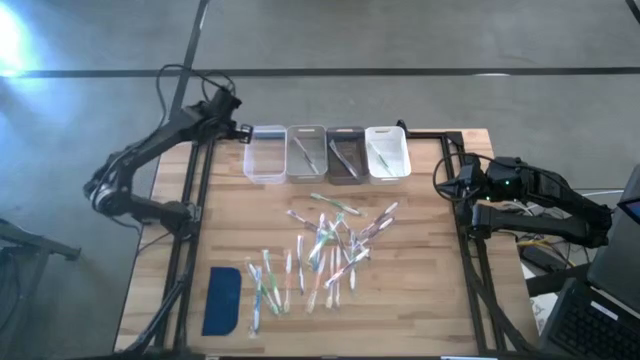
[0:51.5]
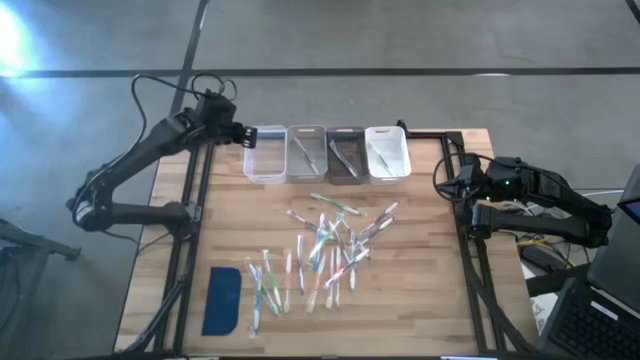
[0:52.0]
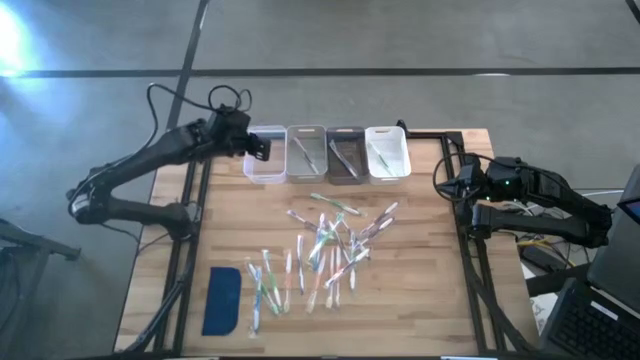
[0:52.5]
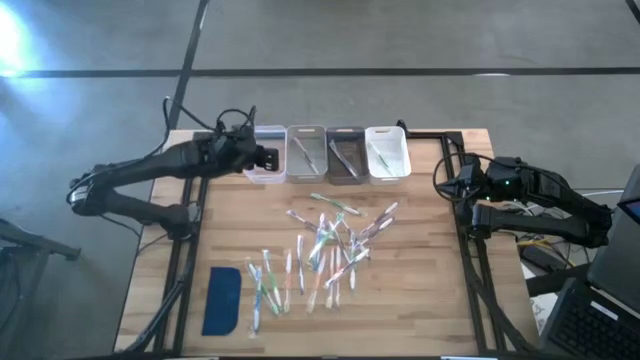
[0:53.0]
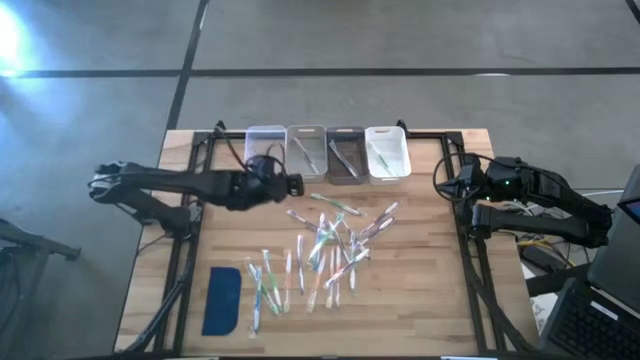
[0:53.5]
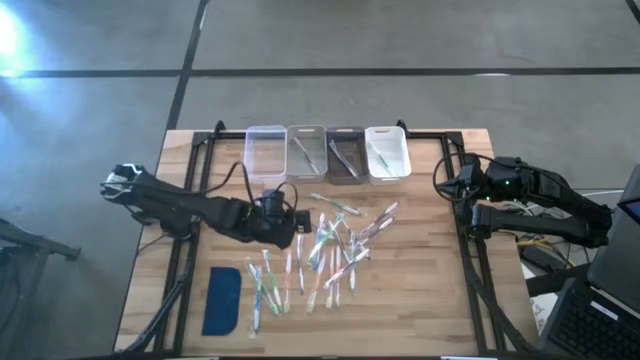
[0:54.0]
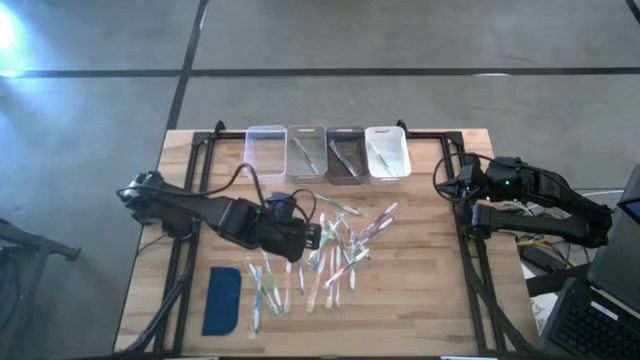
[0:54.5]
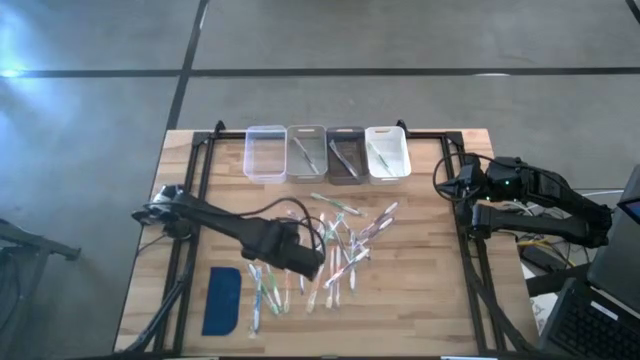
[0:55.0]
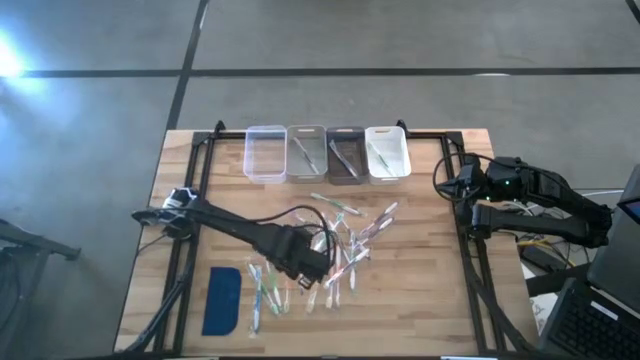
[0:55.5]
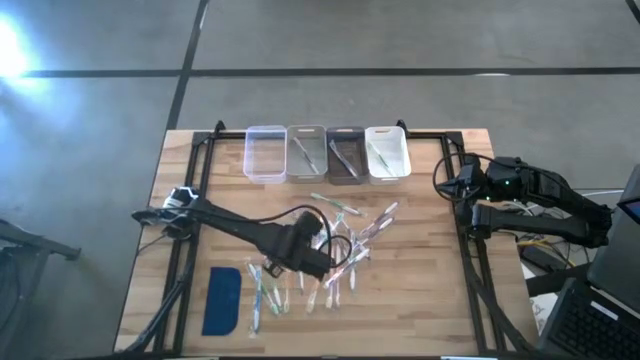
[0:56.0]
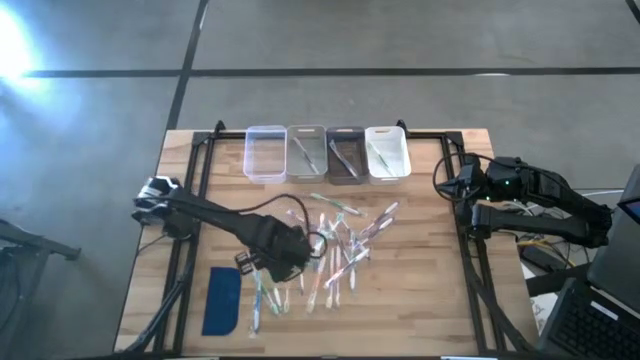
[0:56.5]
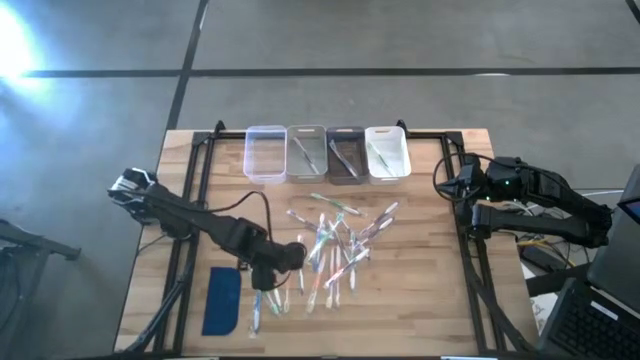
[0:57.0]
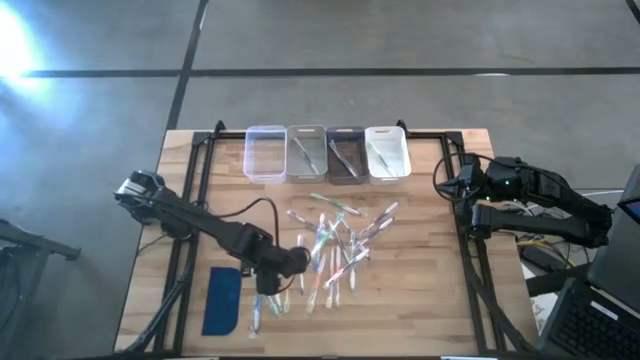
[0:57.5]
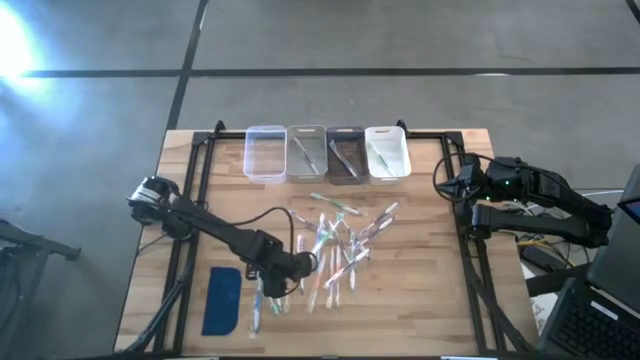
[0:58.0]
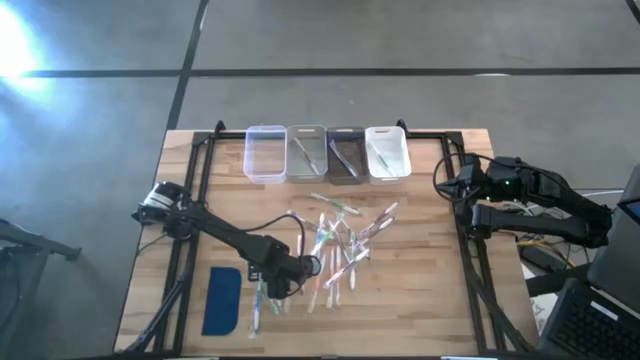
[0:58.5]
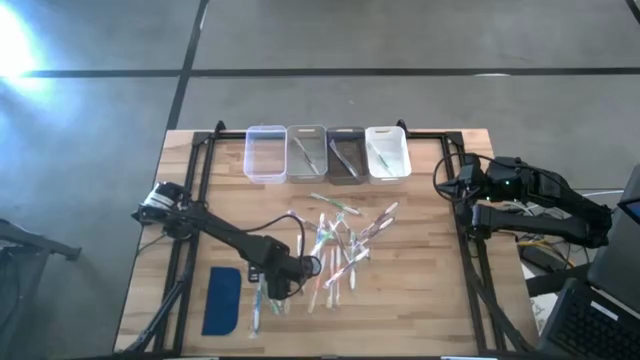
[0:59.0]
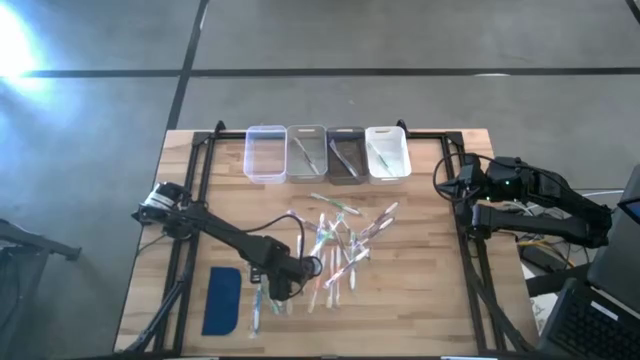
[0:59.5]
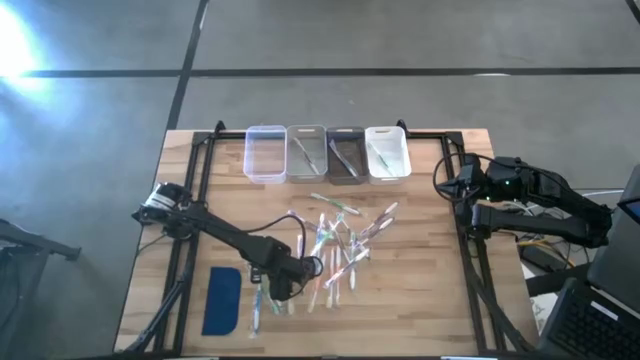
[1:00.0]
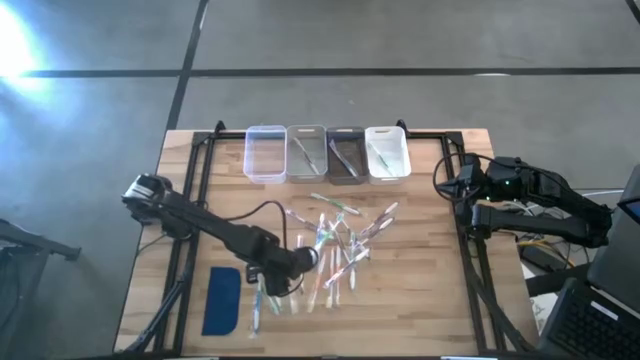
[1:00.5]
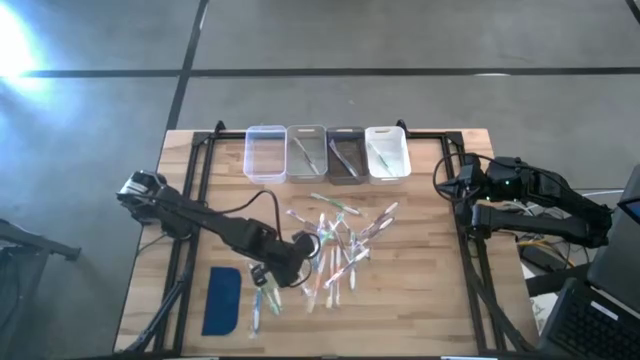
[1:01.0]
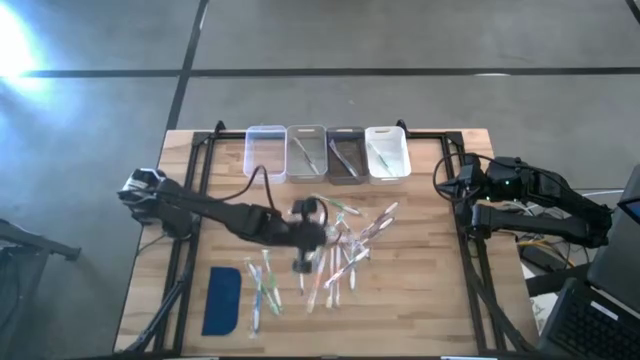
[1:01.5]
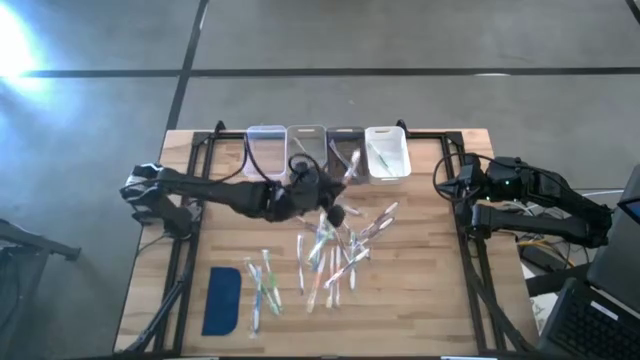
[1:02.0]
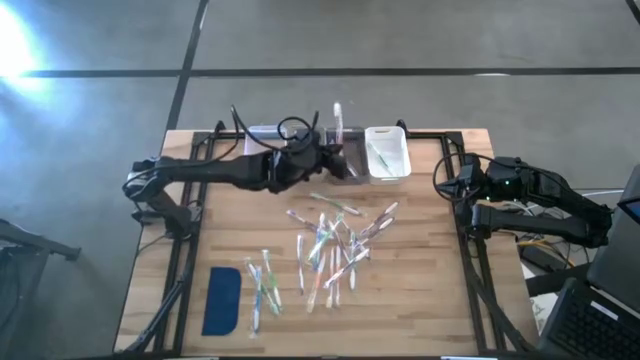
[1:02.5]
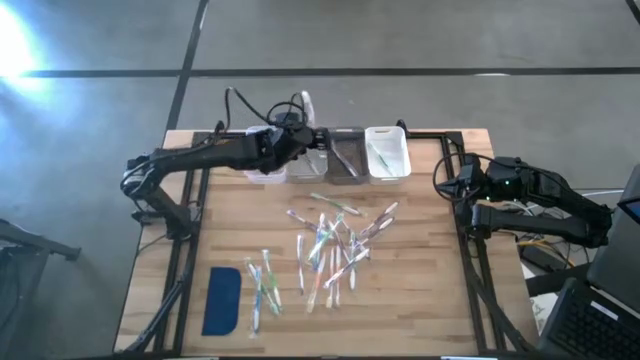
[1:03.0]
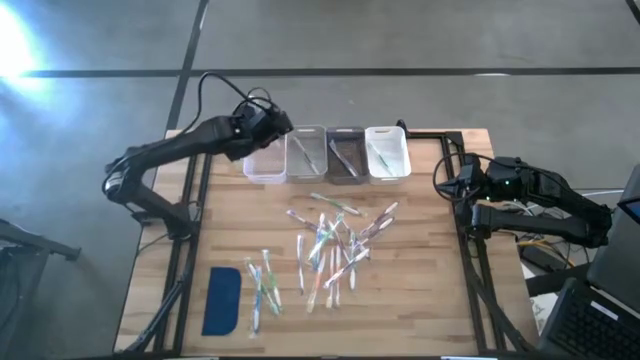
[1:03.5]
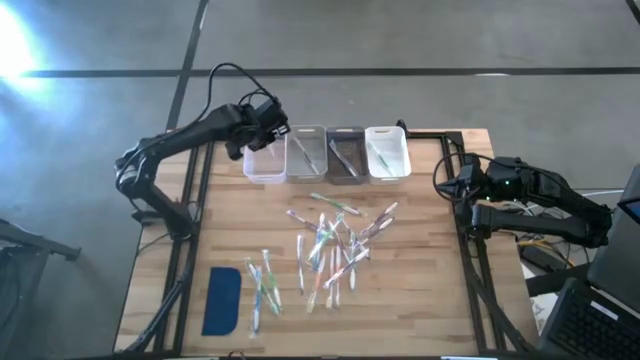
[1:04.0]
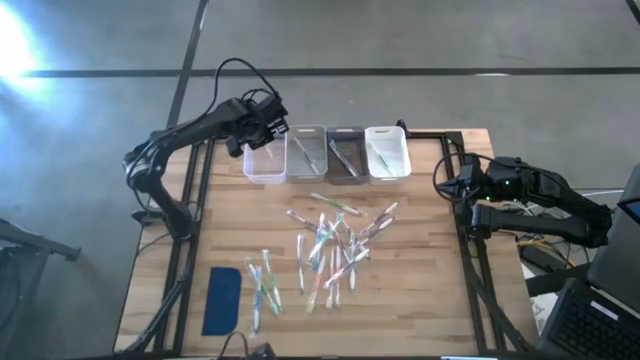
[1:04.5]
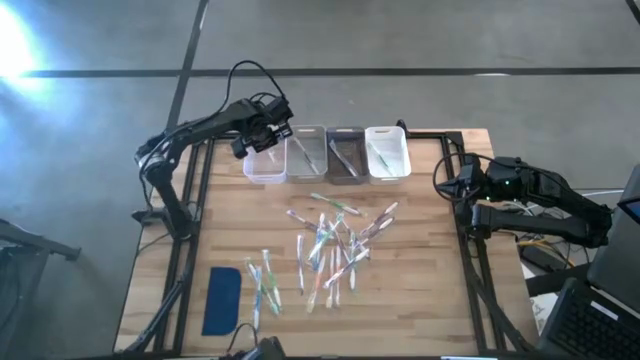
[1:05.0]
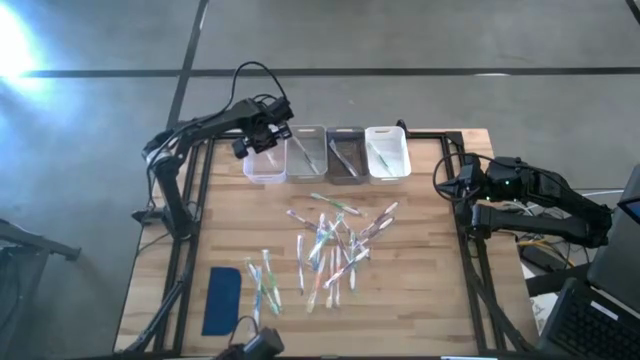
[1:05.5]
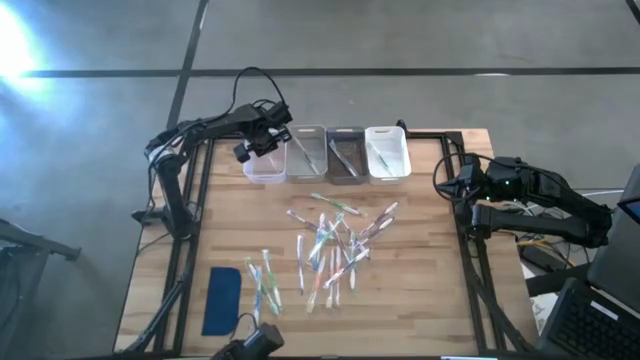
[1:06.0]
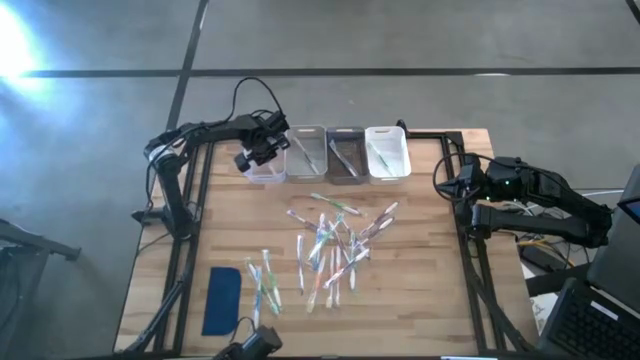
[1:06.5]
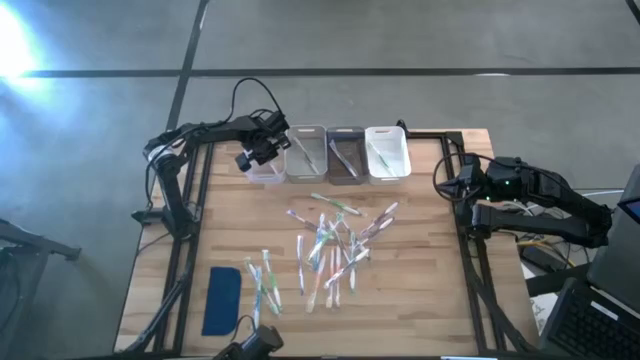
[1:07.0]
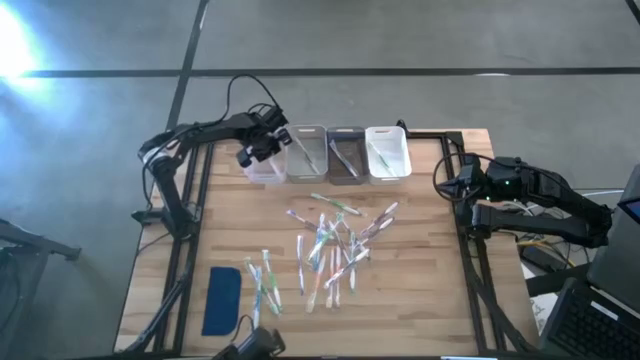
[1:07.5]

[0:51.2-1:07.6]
Task: Pick & Place Toothbrushes
Put the orange toothbrush into the white transparent bin

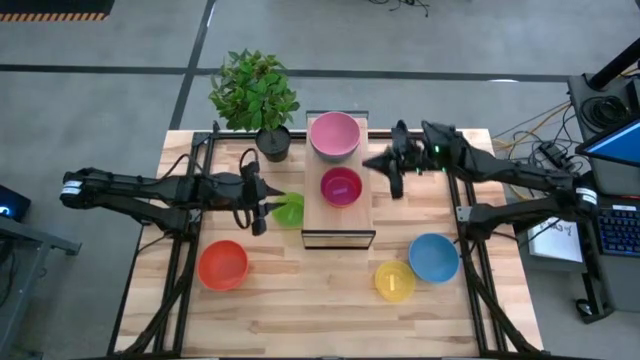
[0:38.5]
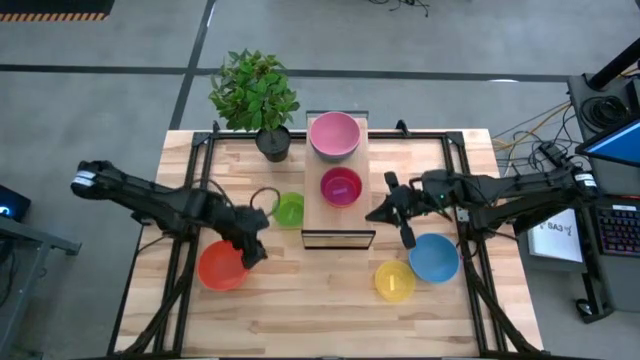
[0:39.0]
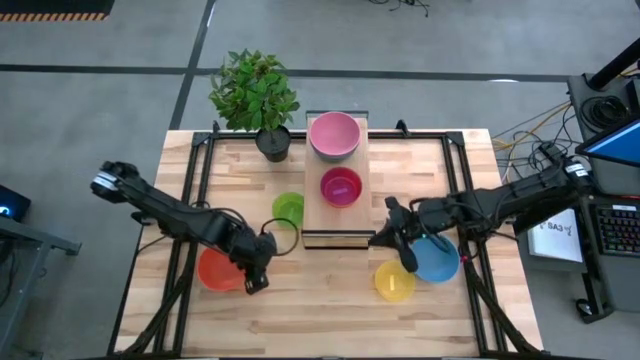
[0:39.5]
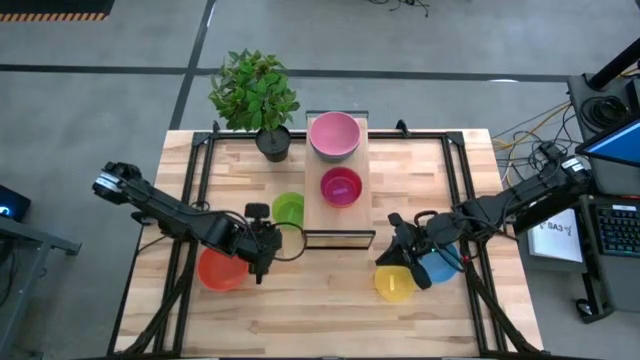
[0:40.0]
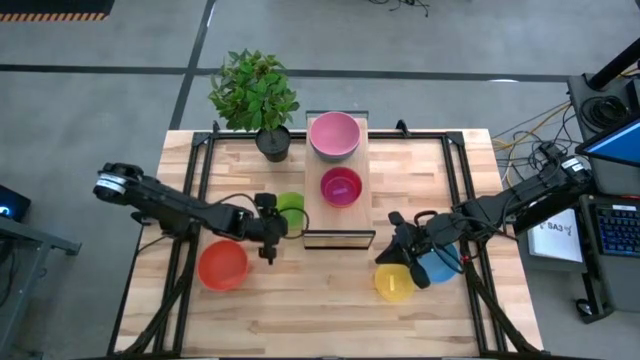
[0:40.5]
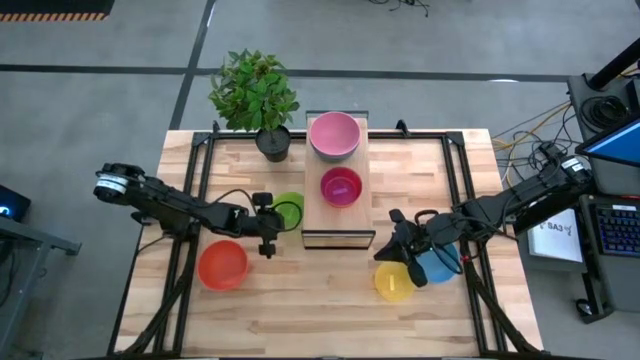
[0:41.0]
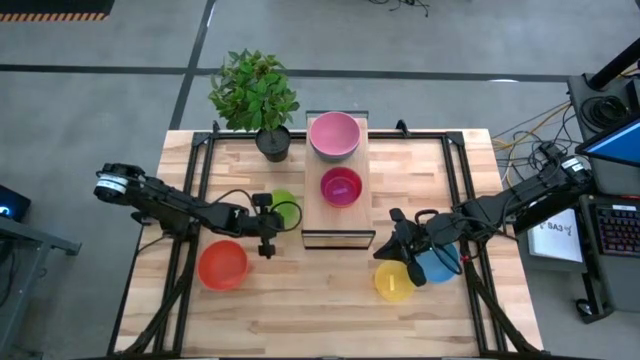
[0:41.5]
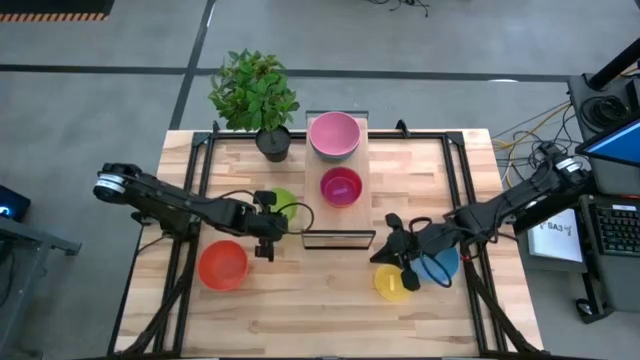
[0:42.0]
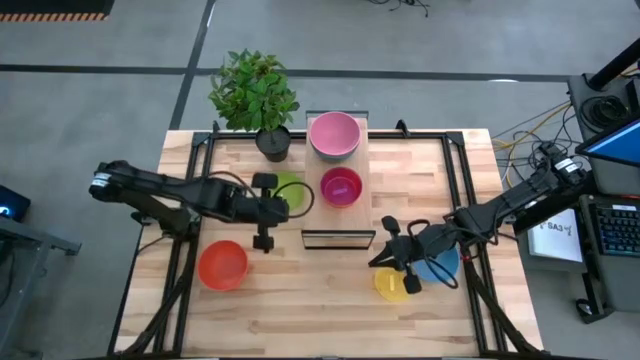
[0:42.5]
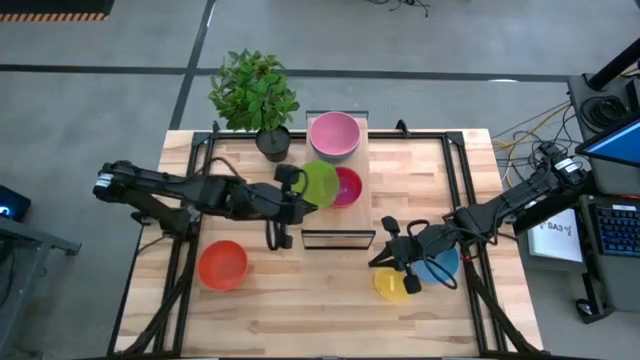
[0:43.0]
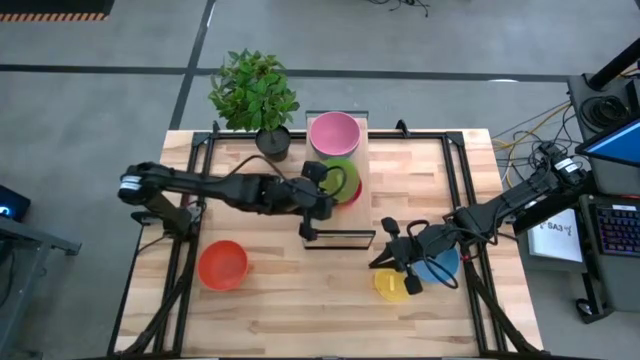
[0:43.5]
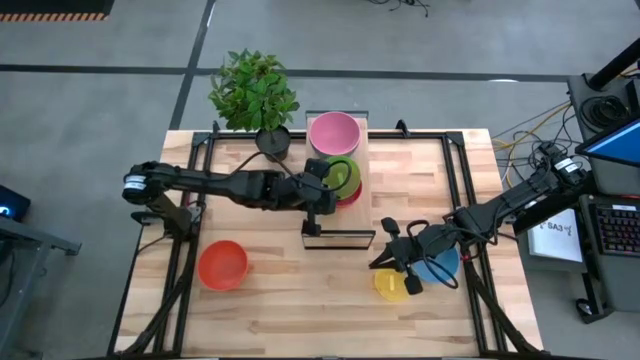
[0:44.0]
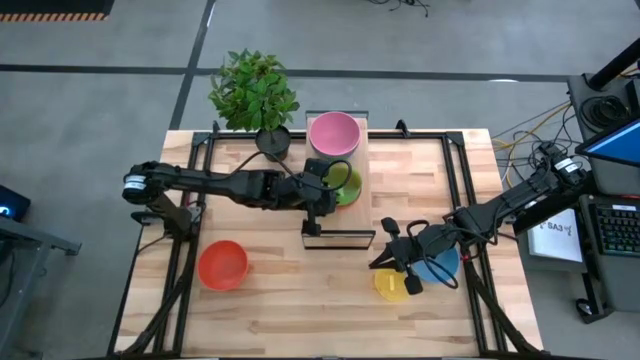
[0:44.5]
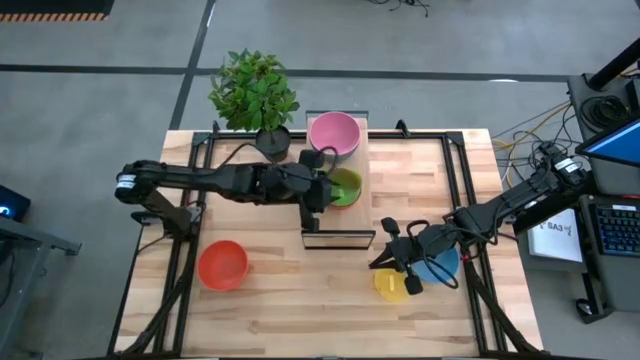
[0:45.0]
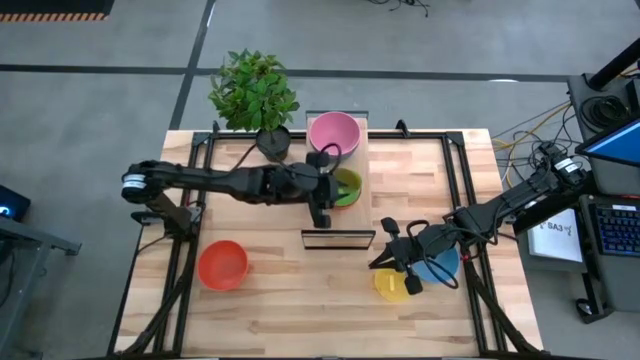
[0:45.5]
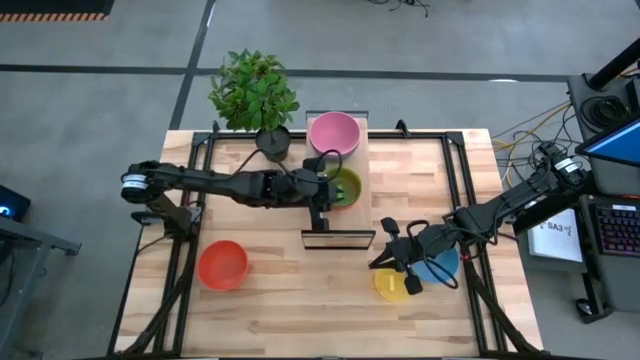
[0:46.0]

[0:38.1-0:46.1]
Task: Place and stack bowls onto a shelf
Stack the green transparent bowl into the purple transparent bowl on the shelf
